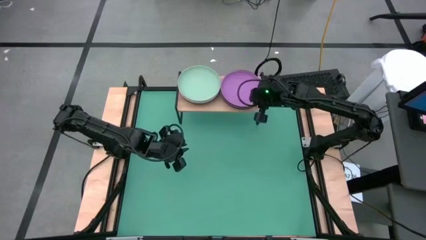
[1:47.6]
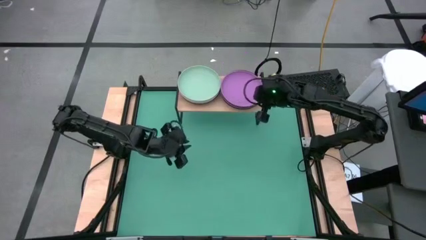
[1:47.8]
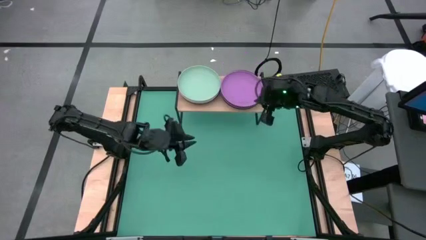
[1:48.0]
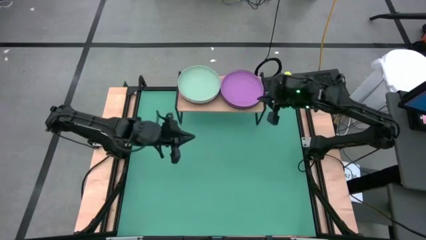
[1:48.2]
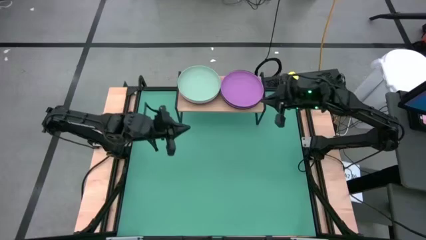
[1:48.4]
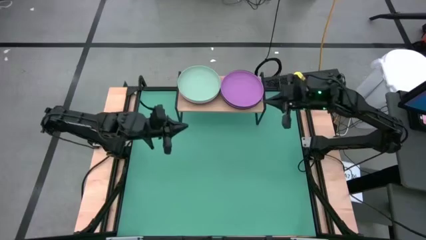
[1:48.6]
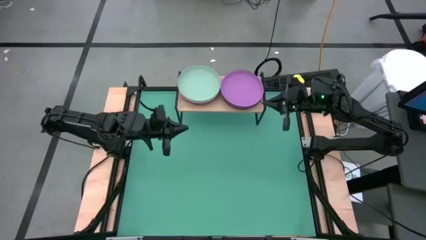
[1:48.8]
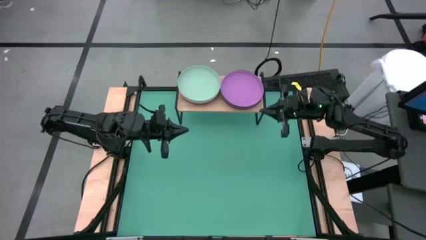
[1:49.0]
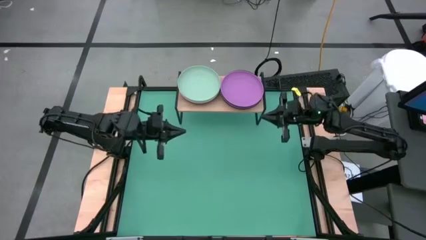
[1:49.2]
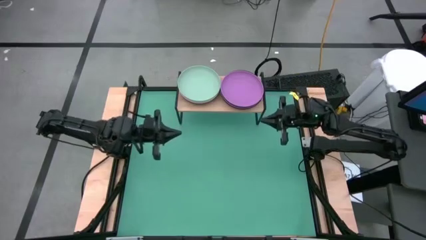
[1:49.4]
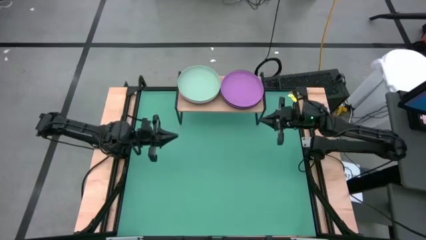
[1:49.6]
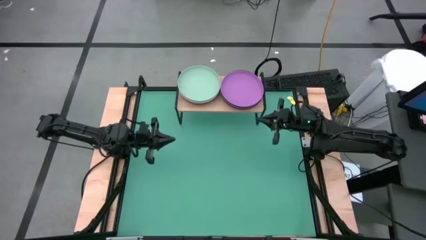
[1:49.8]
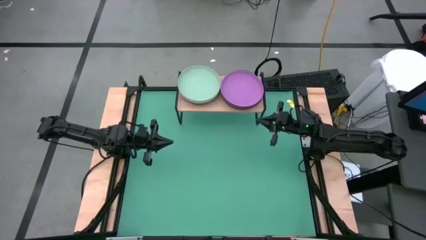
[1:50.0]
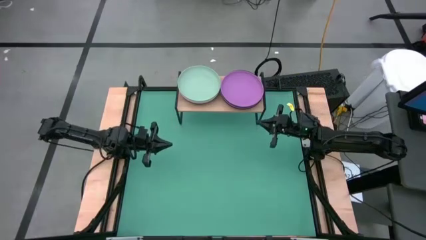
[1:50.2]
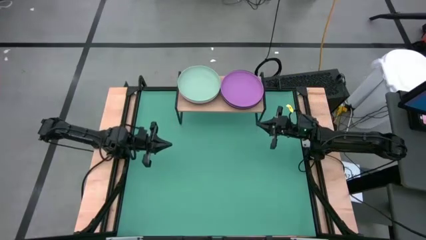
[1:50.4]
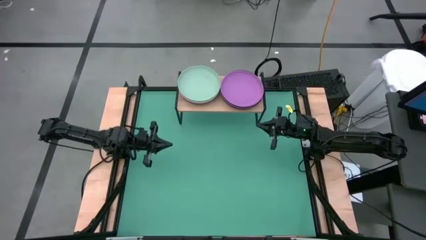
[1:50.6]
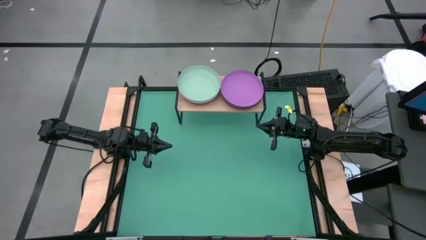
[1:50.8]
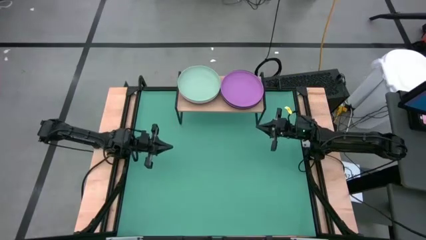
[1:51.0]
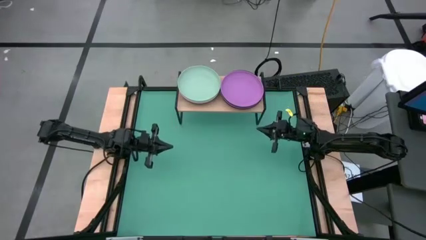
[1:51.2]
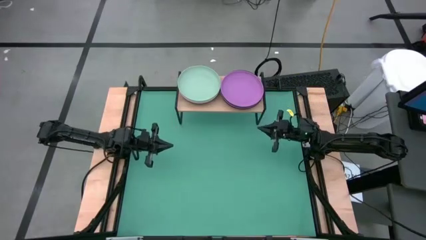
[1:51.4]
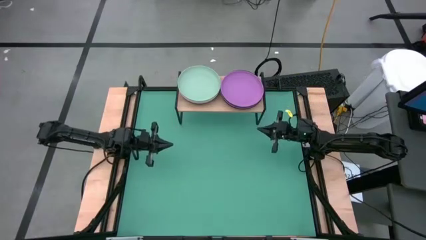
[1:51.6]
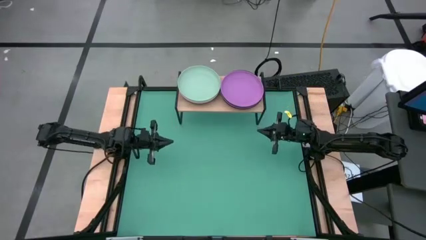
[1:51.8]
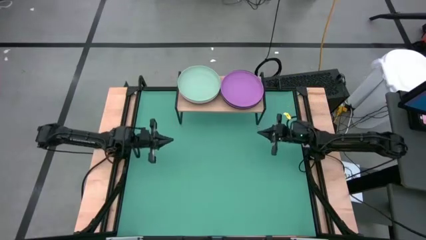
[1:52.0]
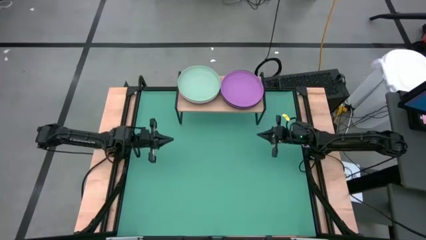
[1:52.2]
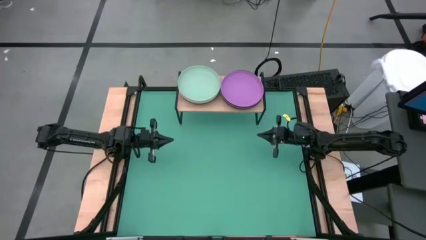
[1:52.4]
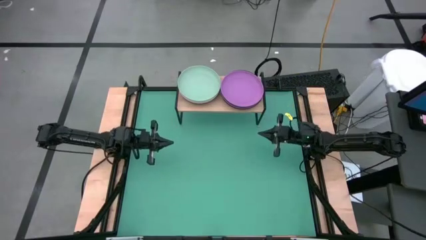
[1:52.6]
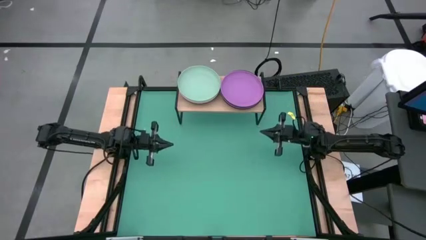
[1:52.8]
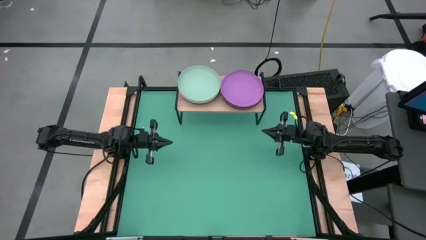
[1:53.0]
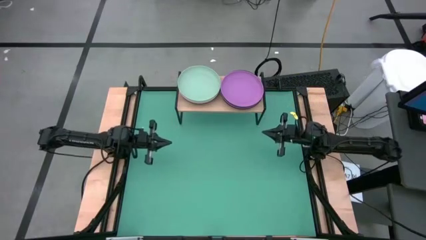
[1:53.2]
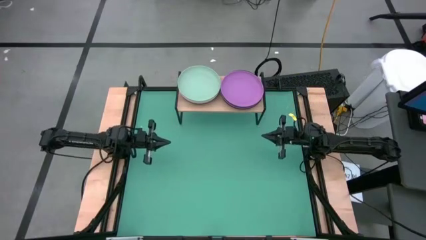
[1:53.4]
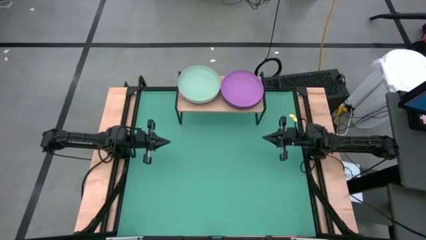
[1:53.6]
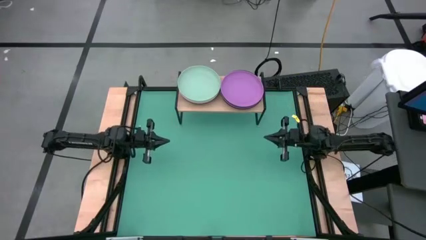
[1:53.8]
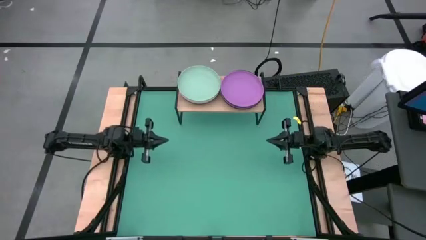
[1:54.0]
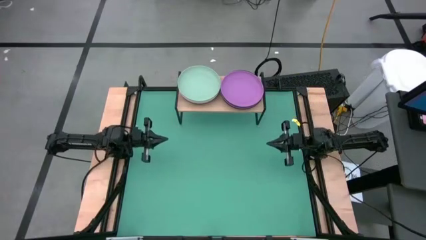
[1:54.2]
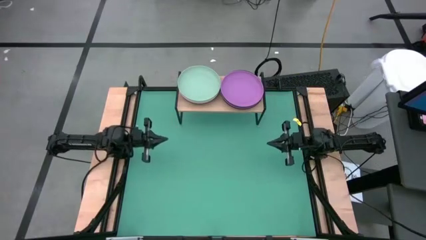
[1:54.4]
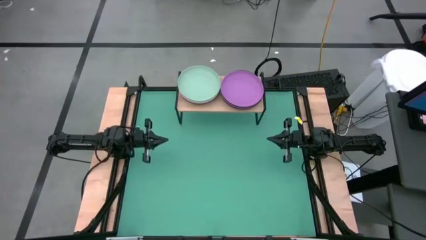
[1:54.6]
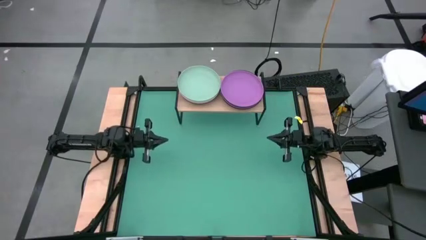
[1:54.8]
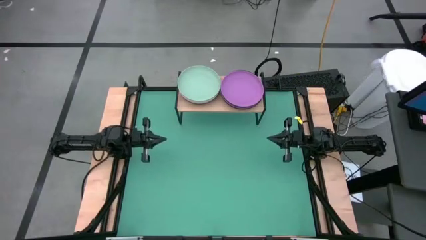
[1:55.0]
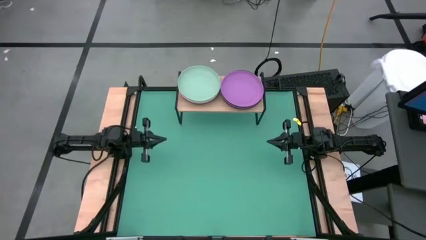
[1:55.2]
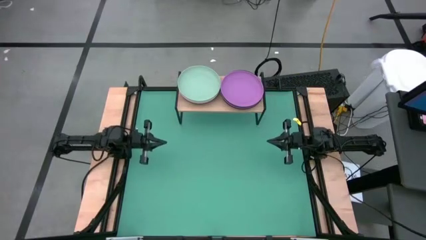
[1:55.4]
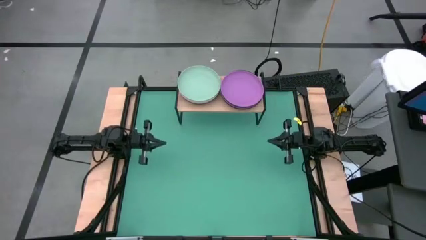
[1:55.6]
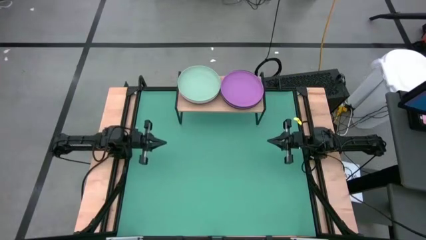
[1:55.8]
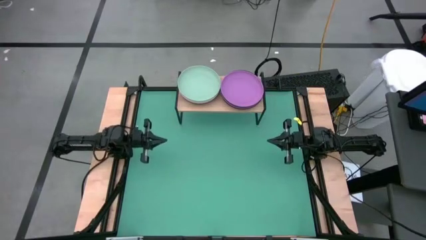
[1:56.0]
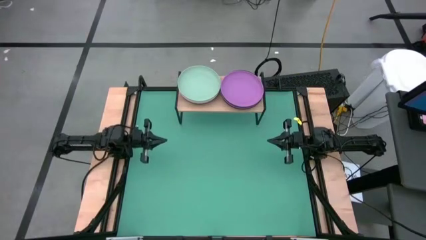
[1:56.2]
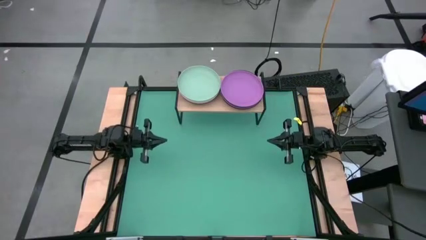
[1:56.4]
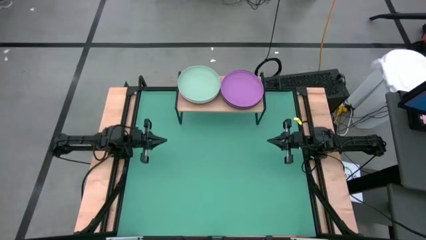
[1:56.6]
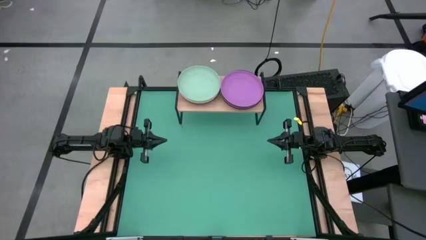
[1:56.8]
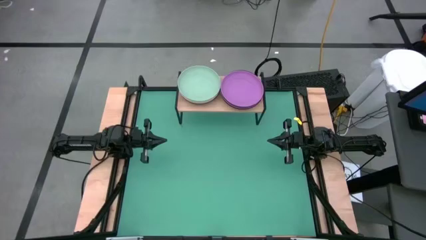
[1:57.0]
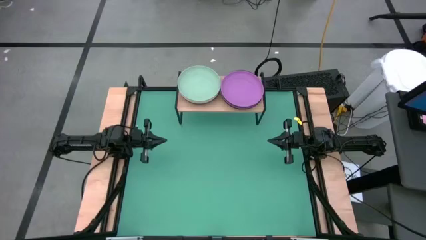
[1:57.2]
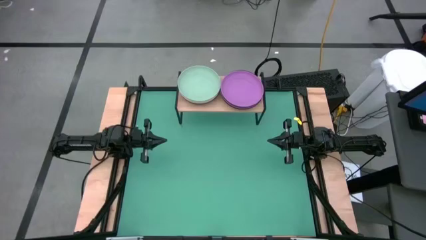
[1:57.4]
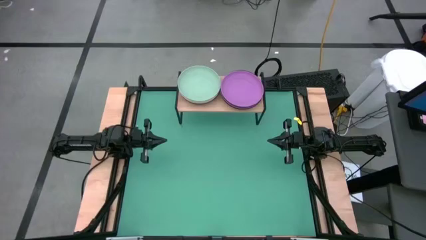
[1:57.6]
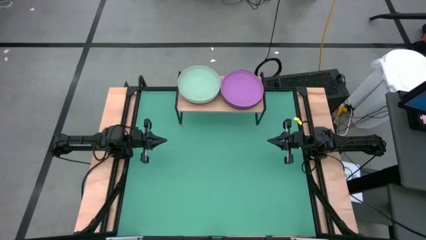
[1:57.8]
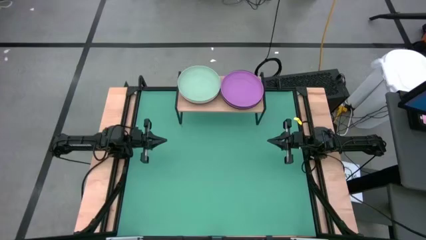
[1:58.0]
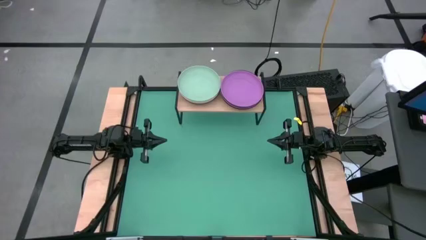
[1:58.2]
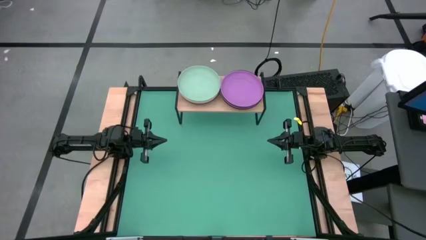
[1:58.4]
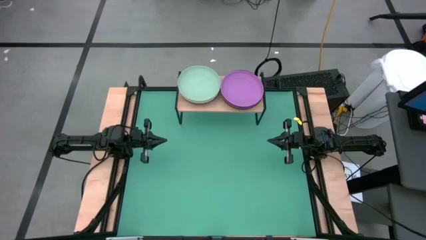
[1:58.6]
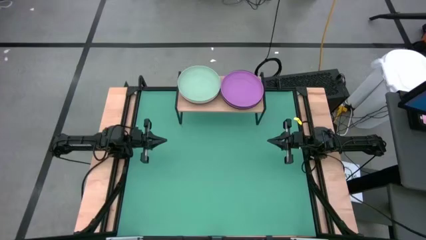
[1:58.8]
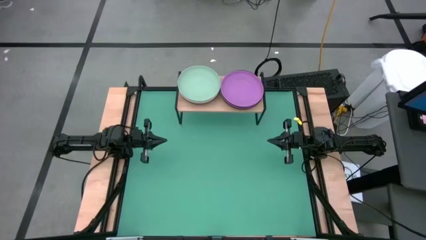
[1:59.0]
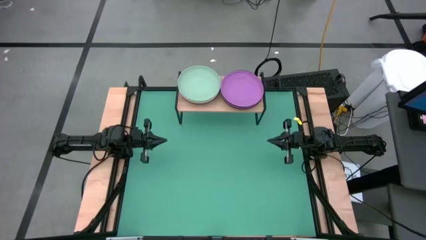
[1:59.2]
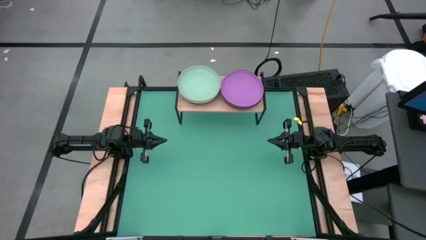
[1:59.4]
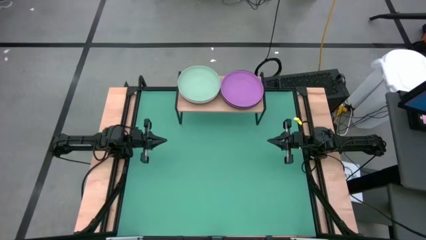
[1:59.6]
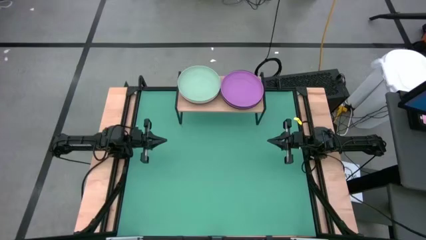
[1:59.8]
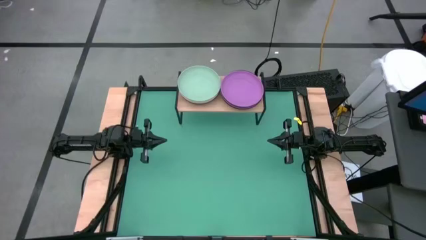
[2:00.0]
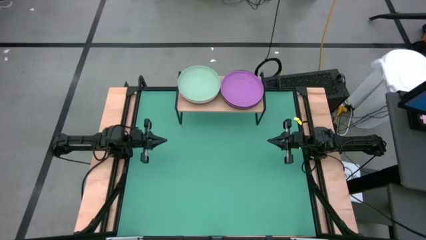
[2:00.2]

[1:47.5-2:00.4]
Task: Place and stack plates onto a shelf
Return to Home Position

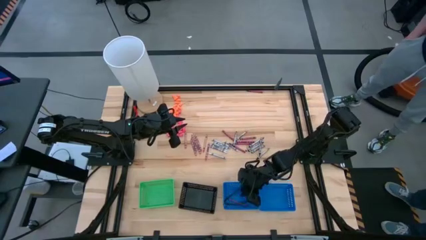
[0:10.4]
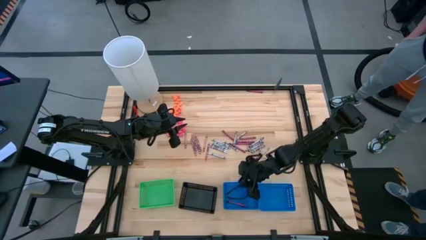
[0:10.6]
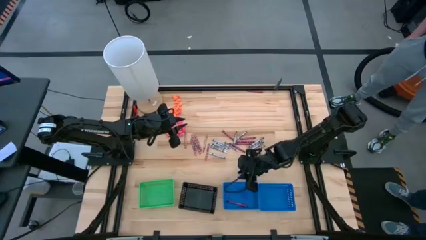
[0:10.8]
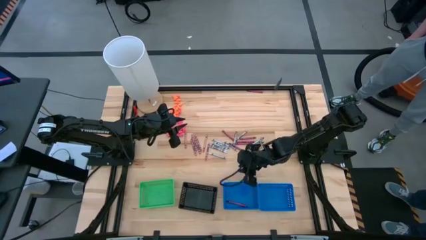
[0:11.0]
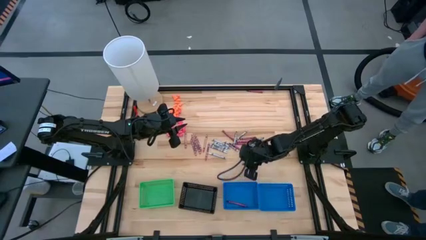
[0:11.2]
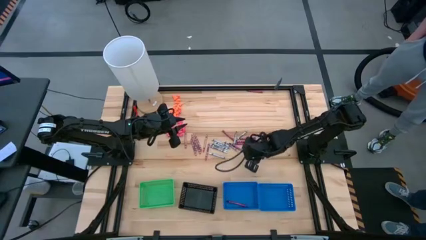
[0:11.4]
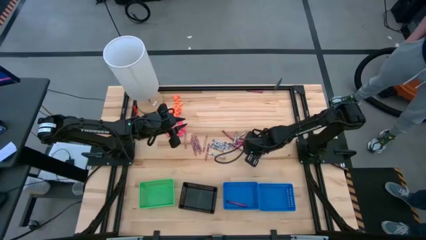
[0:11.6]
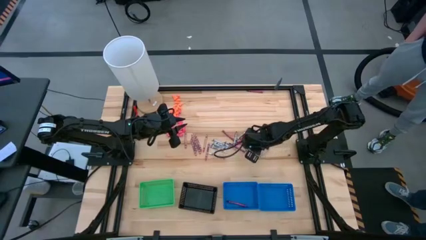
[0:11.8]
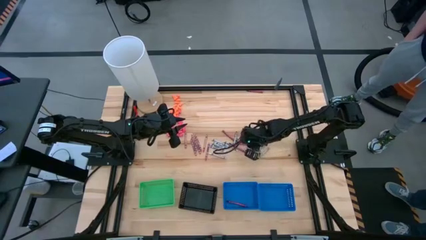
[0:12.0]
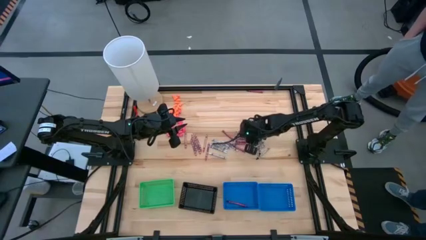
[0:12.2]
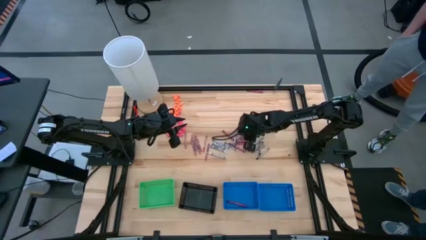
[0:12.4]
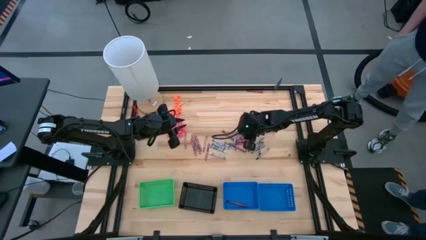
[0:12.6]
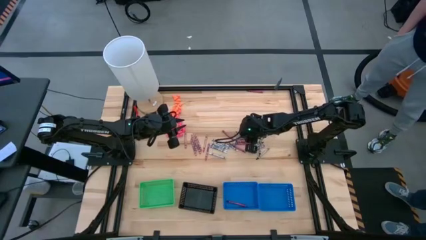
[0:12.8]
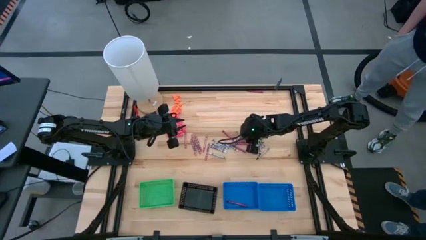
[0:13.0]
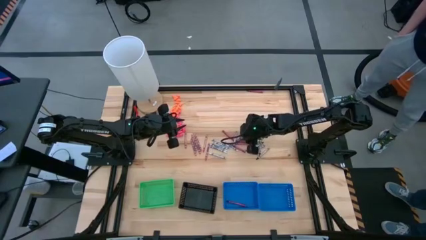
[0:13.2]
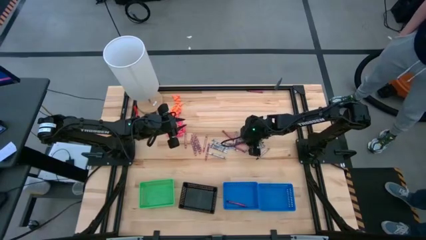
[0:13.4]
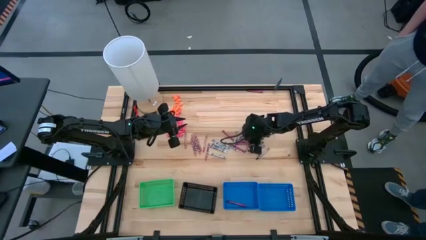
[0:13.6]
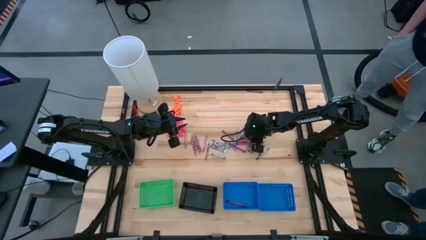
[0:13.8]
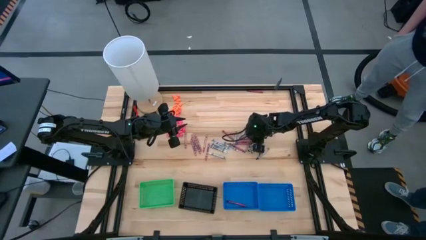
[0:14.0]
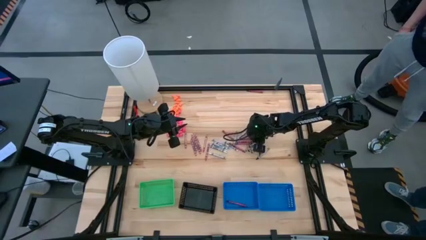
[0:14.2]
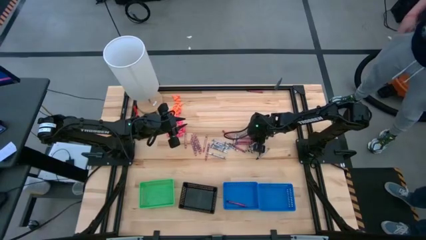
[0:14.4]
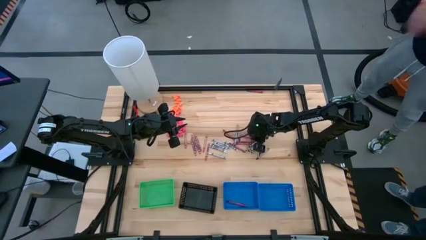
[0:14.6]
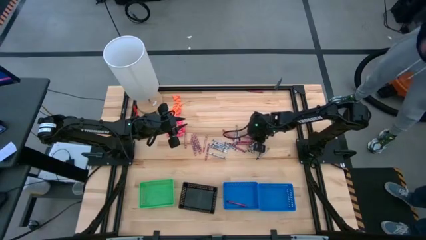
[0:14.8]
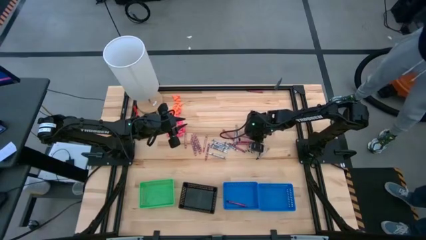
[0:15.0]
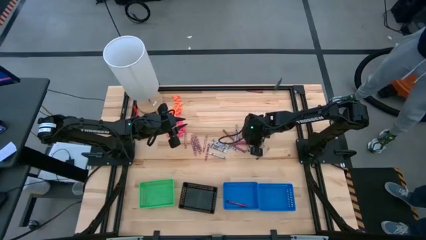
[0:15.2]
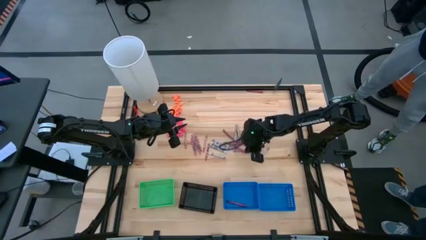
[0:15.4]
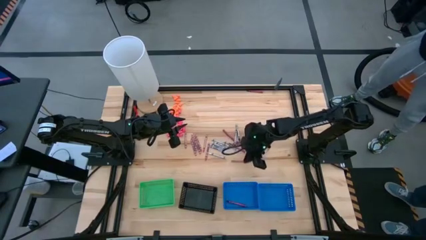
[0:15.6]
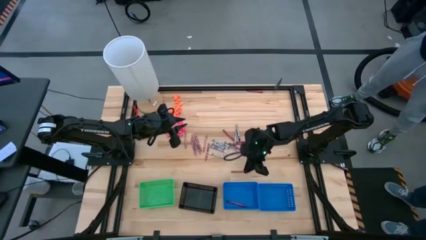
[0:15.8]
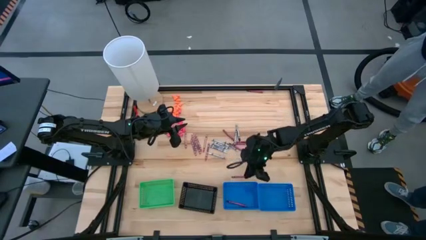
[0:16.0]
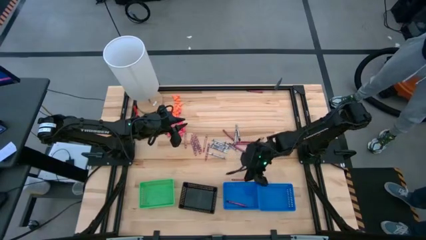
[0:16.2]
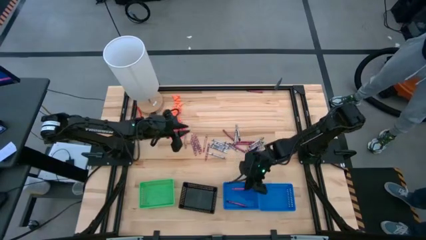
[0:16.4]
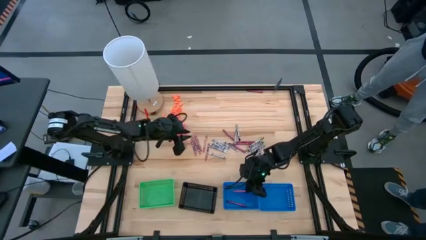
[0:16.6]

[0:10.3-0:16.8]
Task: Sort crayons
Put the red crayon into the left blue bin
